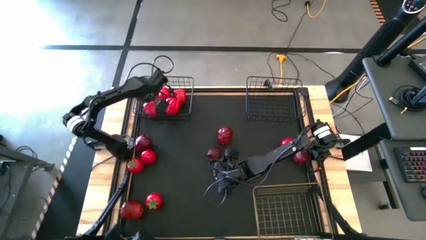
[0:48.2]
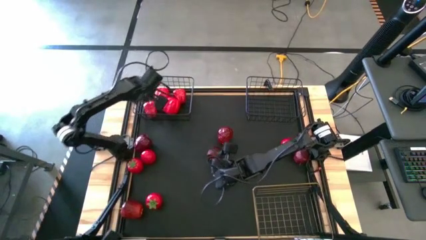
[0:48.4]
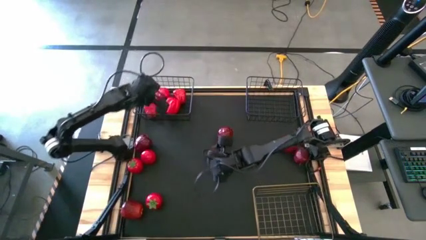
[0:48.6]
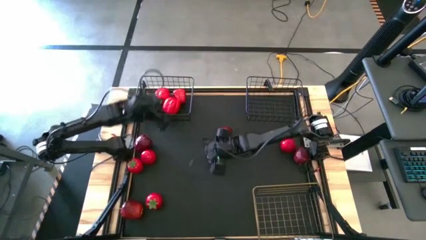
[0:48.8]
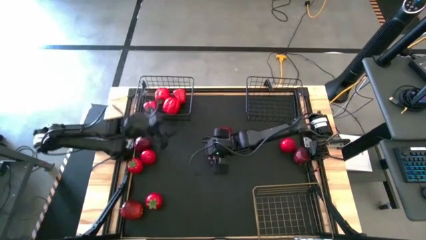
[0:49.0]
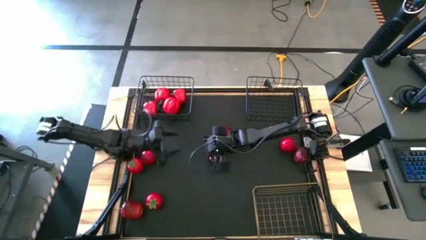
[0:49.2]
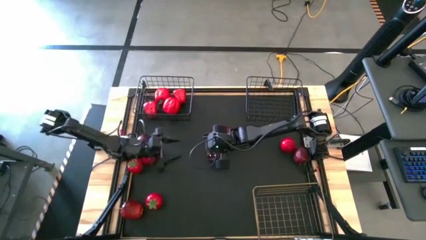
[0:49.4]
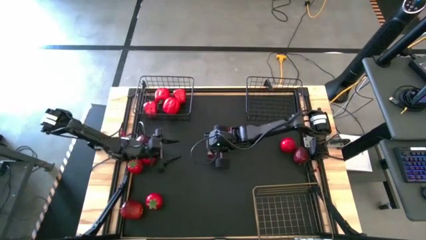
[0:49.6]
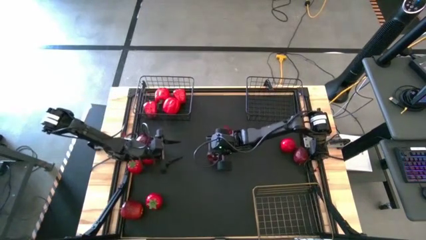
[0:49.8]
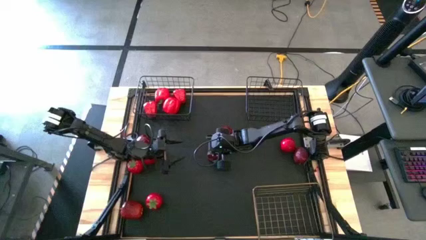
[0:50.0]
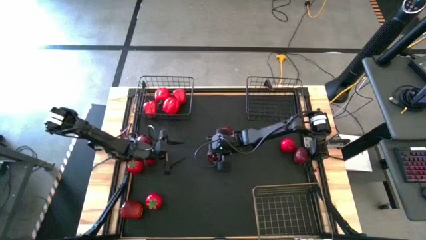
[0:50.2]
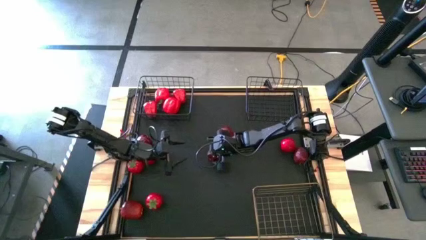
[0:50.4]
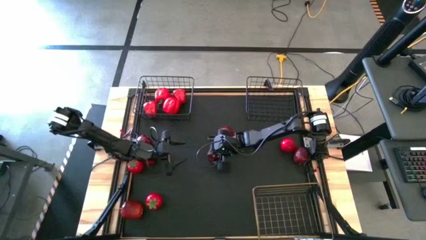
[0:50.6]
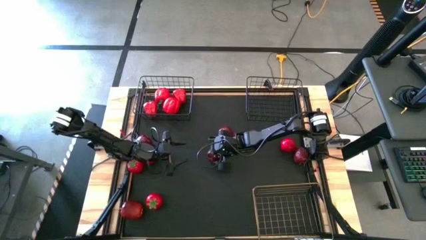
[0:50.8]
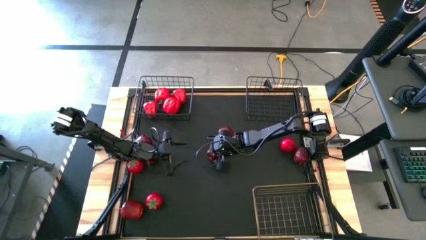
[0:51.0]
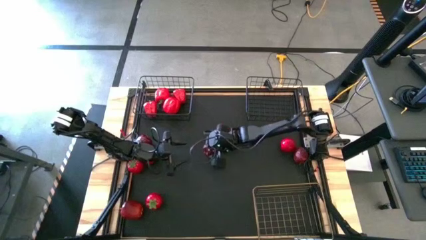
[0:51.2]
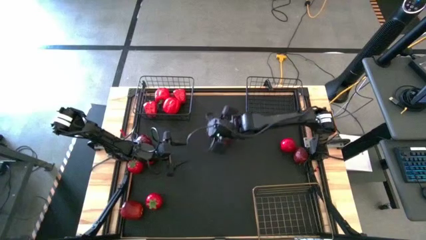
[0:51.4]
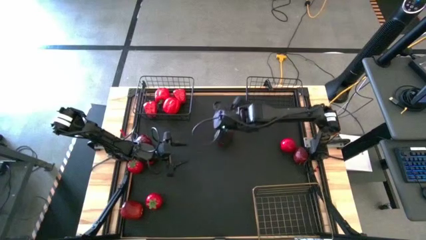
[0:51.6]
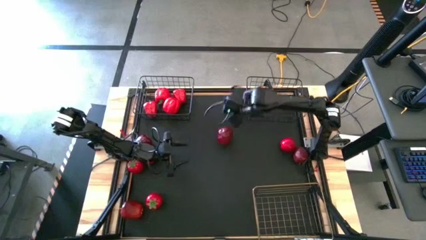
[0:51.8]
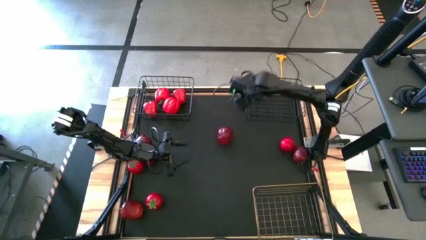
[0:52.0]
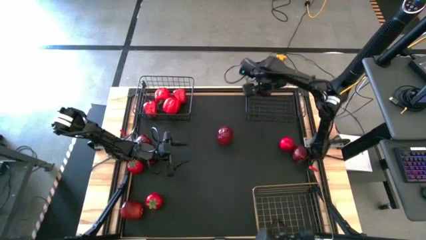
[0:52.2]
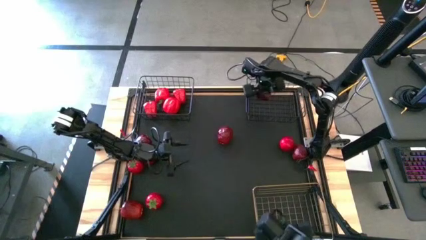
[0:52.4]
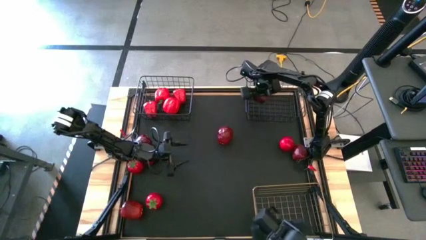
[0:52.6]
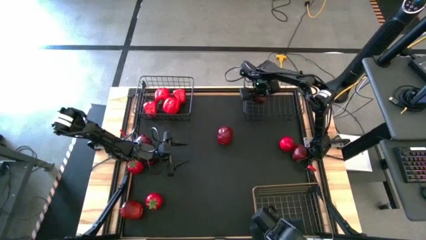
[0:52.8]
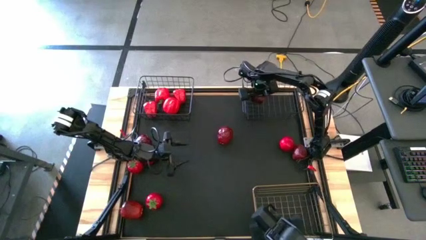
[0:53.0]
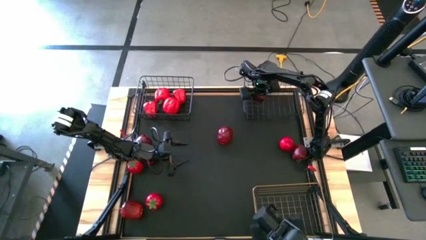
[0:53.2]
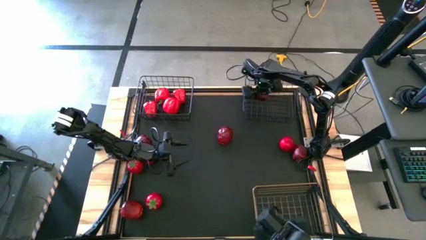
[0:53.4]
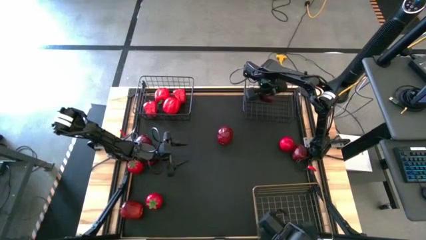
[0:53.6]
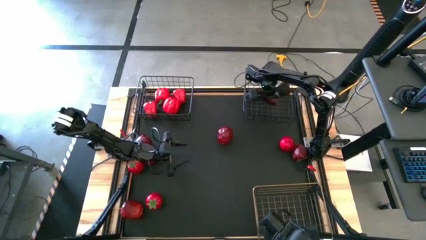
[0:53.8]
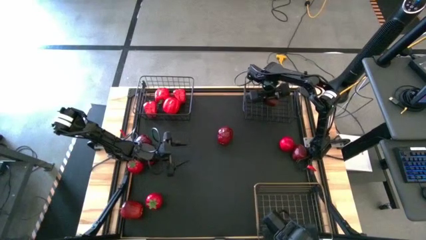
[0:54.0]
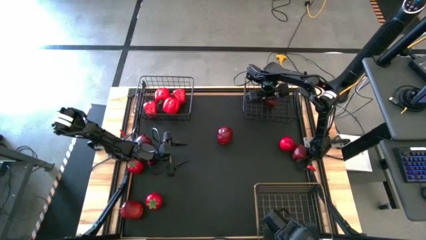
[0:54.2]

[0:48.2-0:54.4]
Task: Sort produce into baskets
Put the apple into the right black wire basket

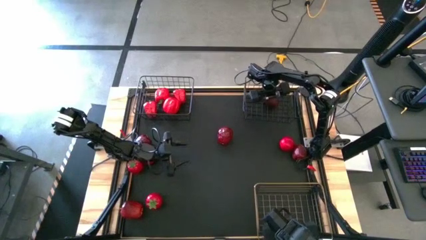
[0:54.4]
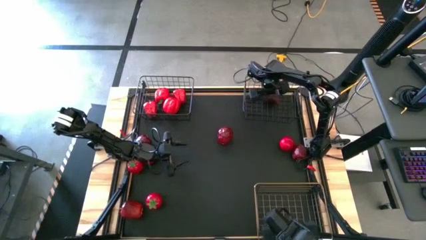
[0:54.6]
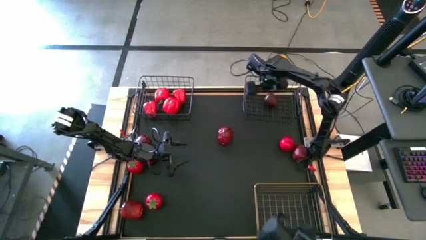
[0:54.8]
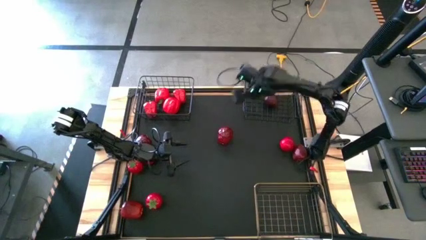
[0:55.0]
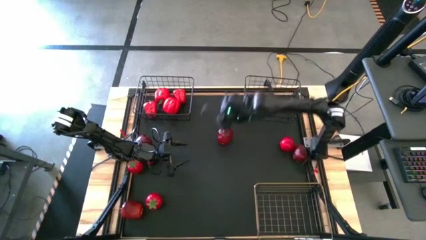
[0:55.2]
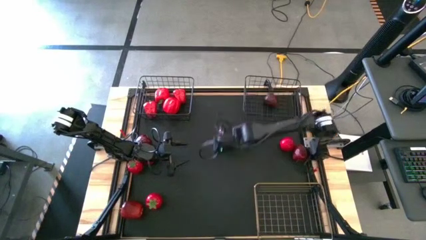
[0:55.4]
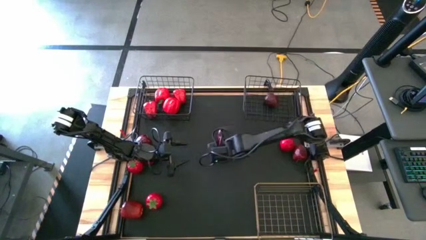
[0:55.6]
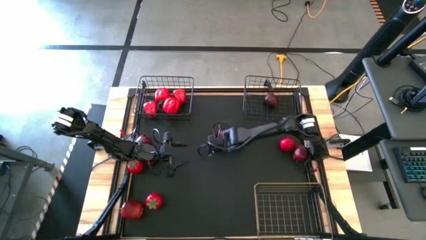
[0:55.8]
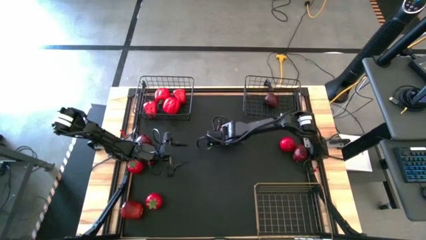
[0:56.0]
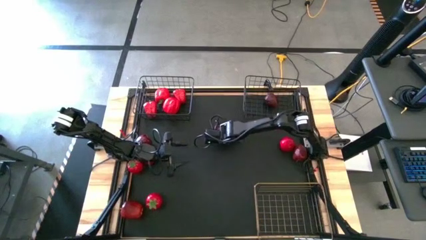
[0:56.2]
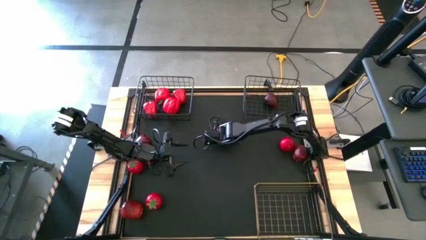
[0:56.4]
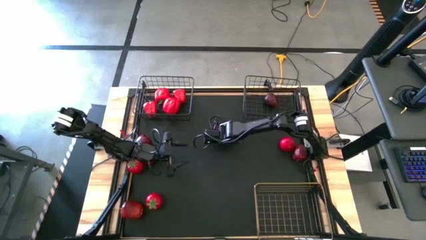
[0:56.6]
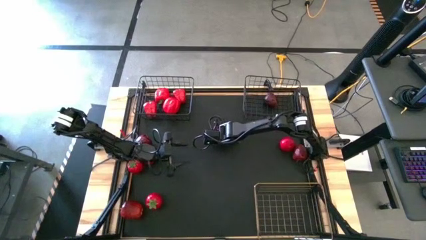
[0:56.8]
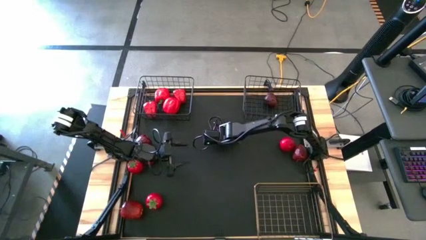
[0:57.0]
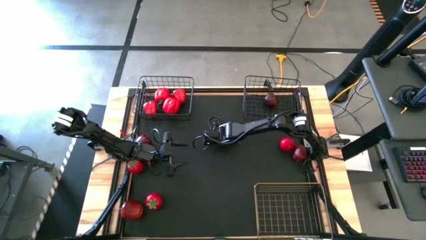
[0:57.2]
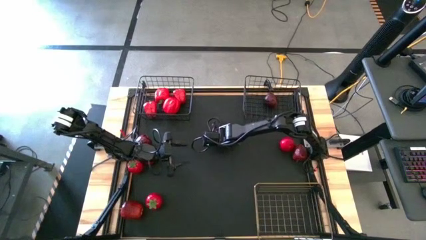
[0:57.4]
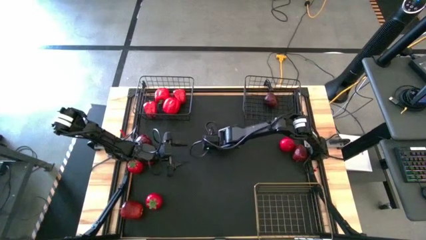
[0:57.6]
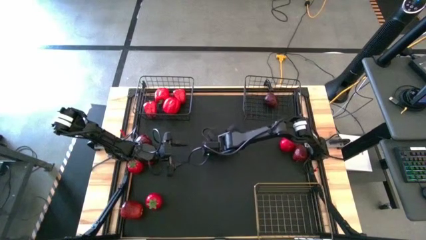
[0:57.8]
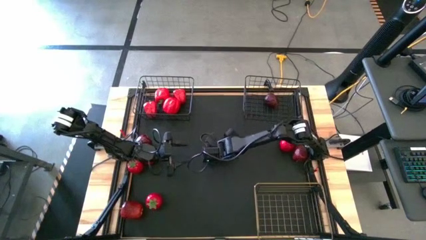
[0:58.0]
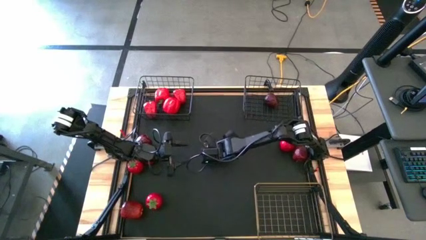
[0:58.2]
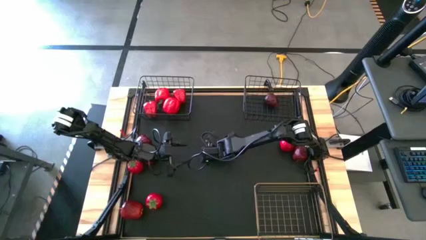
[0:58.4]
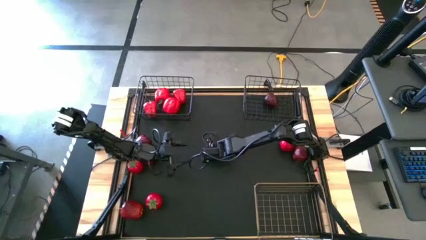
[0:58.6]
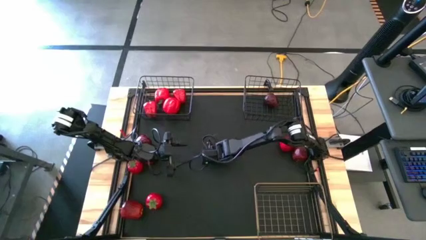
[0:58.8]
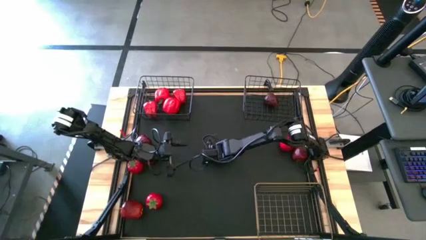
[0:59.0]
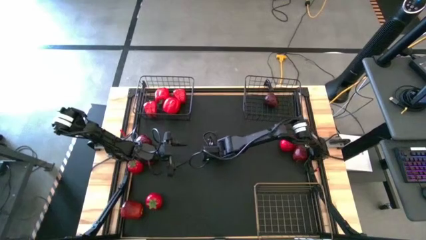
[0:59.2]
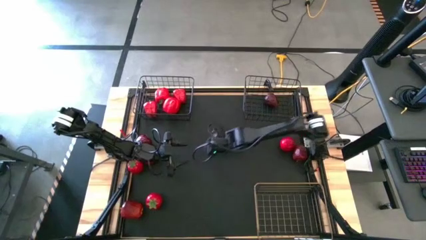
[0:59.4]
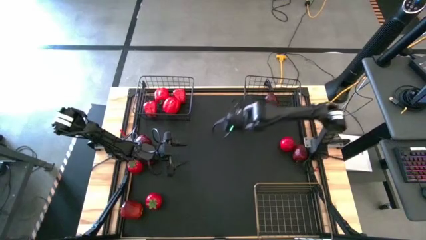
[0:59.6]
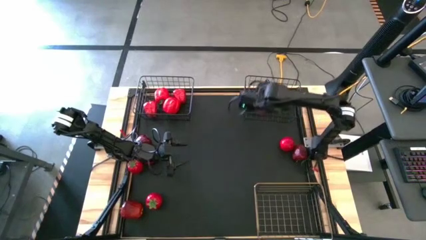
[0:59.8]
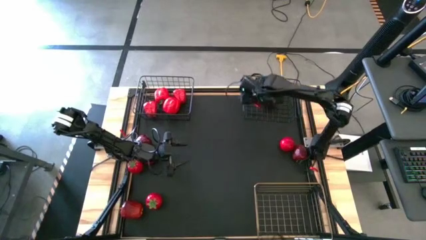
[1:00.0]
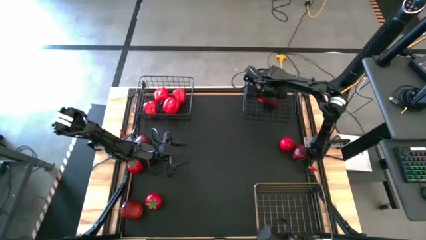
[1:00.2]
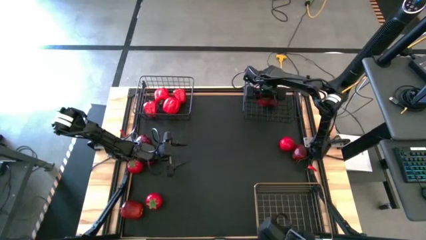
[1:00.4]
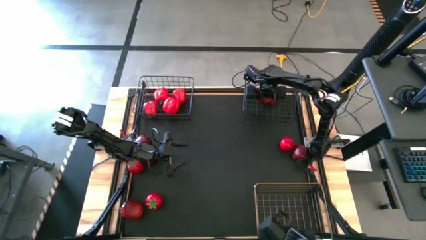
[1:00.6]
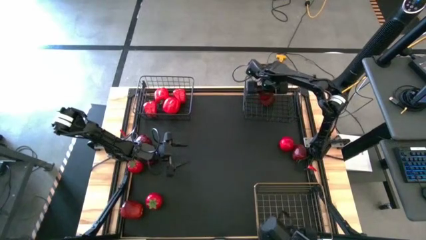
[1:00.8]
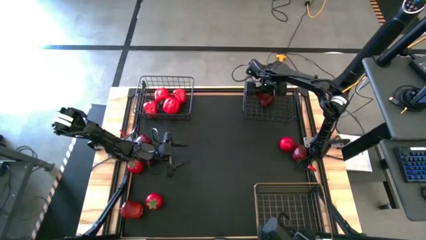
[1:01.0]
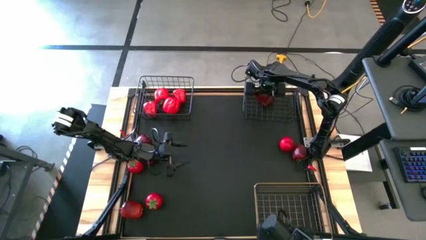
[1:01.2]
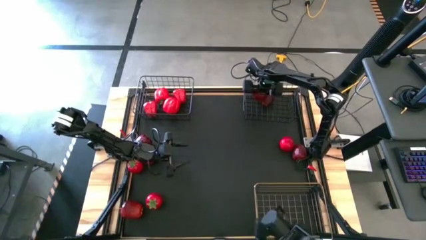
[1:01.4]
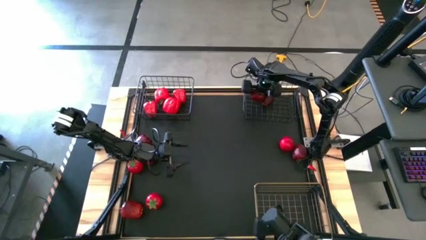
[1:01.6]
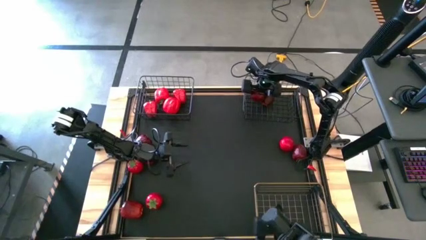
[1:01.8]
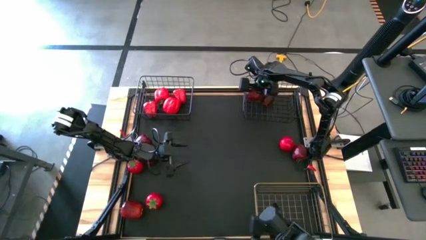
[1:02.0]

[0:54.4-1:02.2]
Put the apple into the right black wire basket

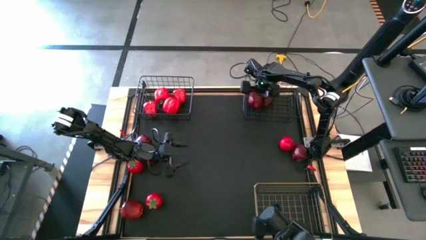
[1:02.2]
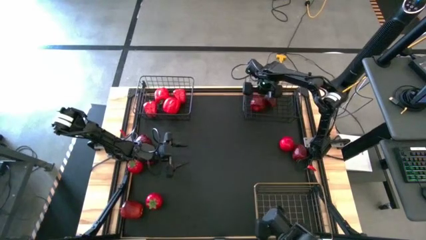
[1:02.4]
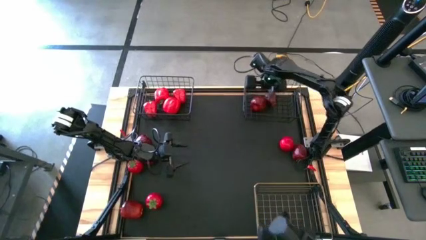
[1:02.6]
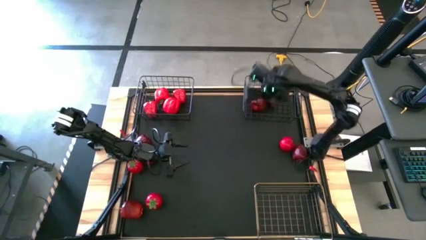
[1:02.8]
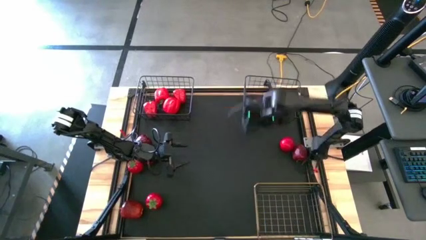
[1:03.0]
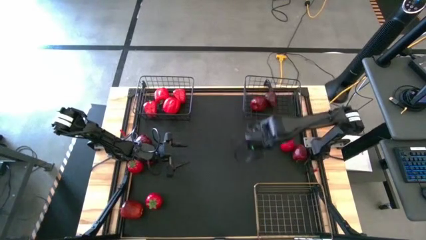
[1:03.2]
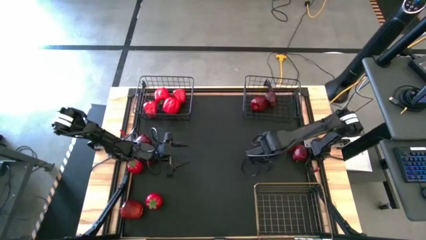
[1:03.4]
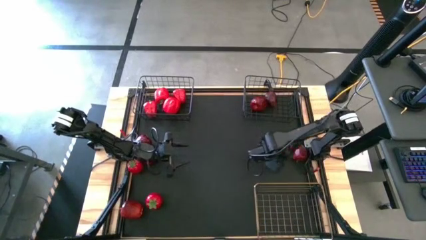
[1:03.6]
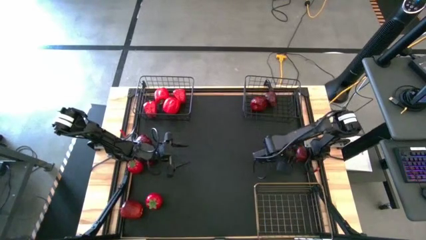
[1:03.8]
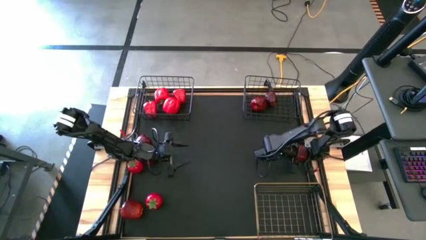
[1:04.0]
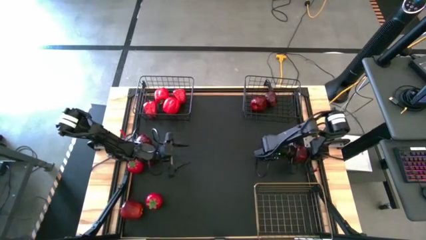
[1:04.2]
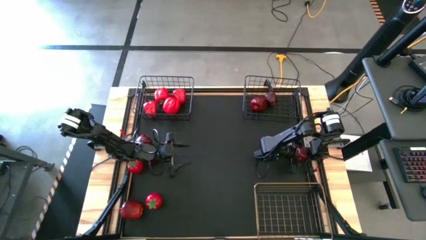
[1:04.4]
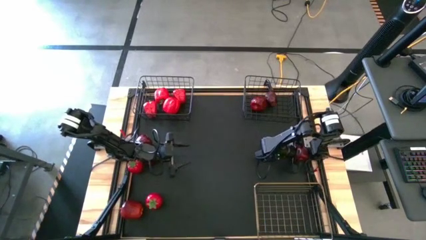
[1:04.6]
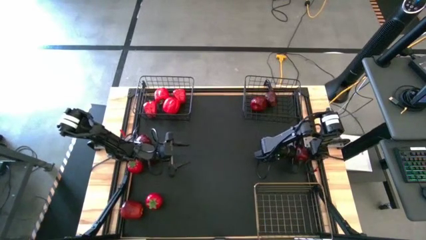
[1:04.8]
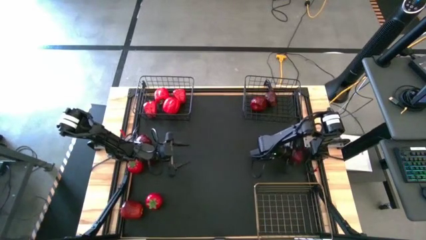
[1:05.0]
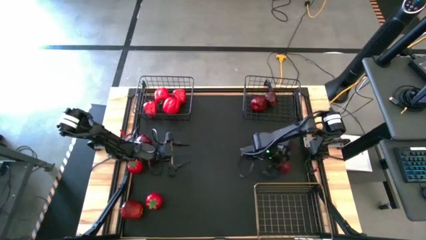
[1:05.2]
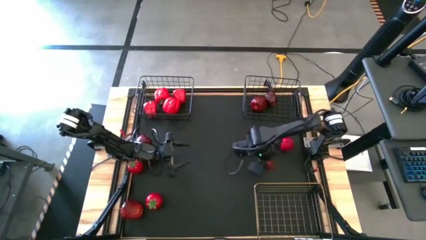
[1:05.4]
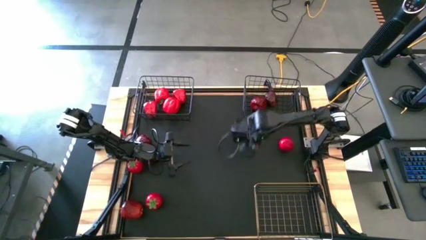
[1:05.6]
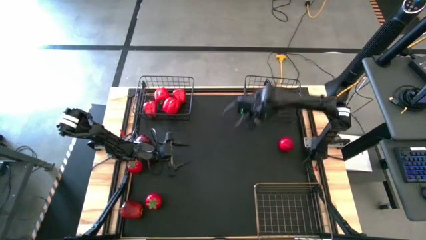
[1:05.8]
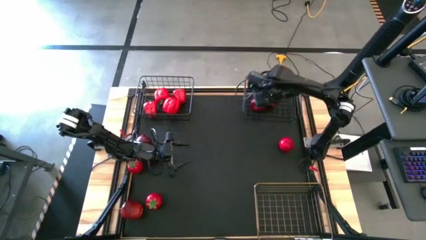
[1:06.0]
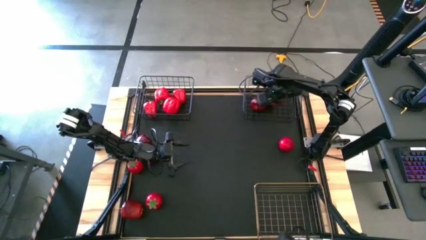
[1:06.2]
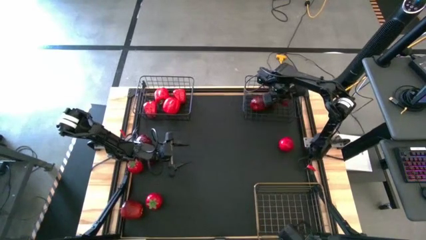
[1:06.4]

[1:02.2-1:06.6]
Put the apple into the right black wire basket
